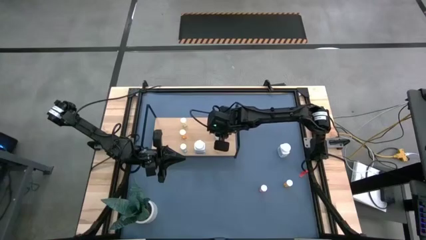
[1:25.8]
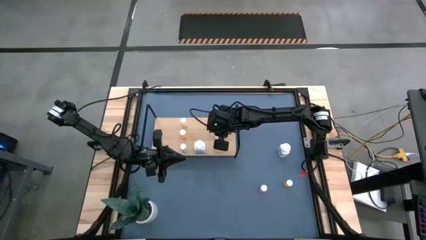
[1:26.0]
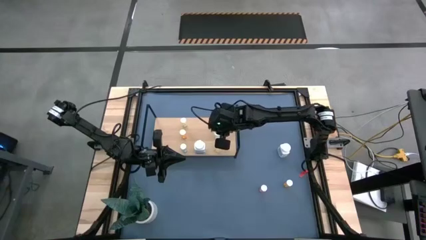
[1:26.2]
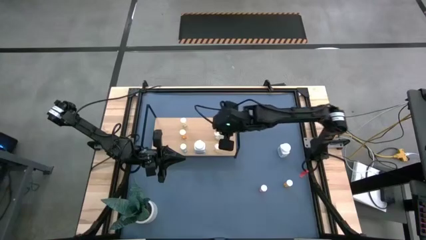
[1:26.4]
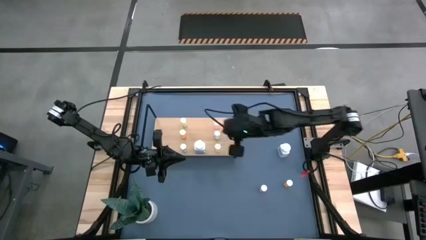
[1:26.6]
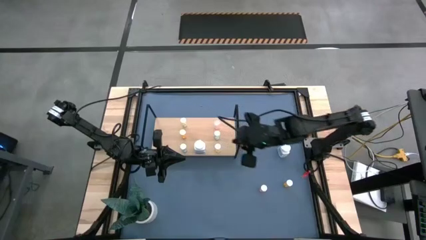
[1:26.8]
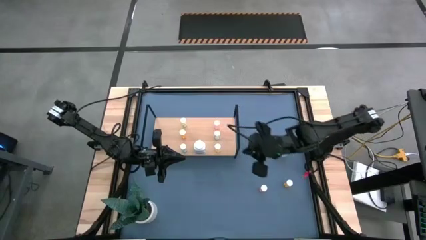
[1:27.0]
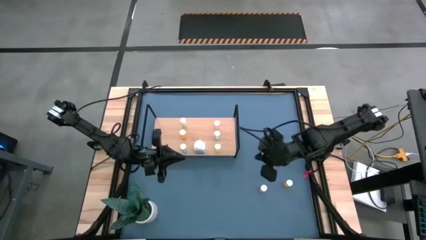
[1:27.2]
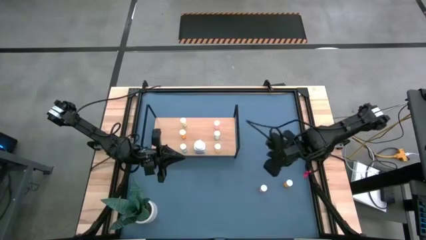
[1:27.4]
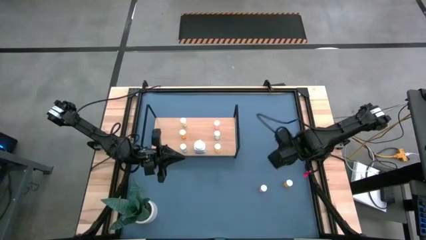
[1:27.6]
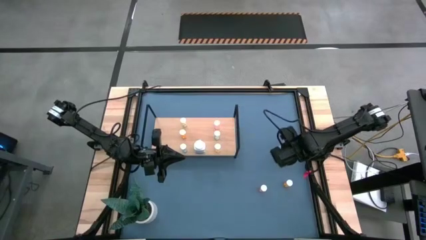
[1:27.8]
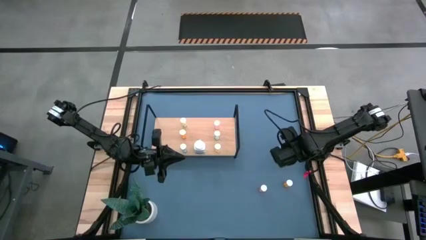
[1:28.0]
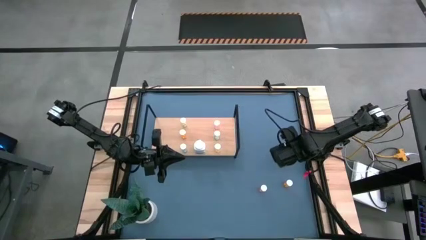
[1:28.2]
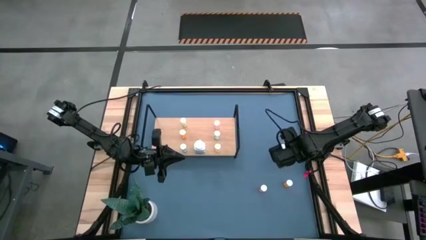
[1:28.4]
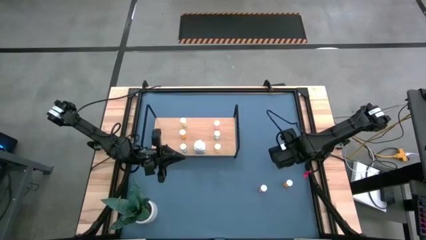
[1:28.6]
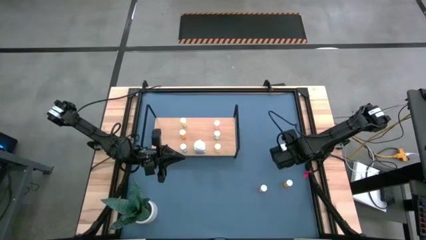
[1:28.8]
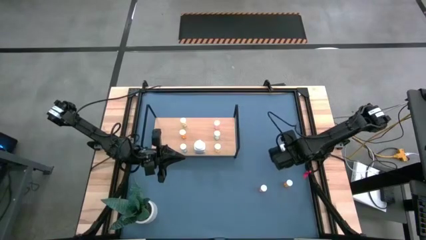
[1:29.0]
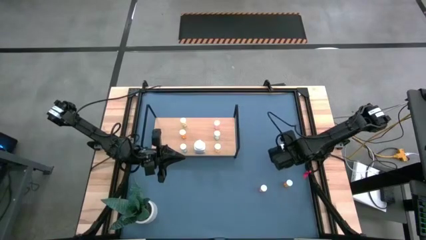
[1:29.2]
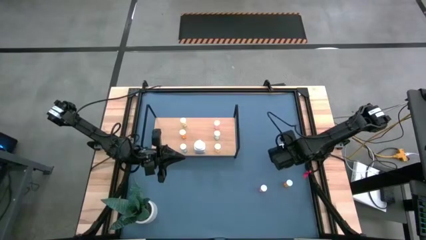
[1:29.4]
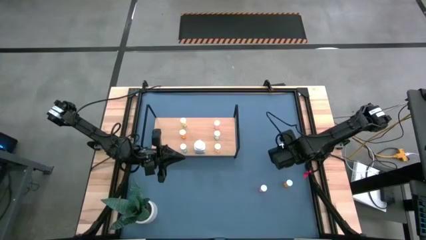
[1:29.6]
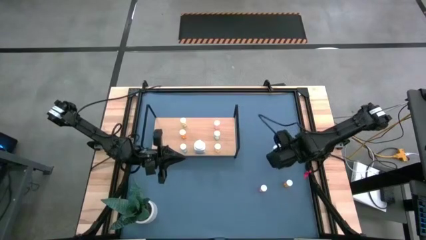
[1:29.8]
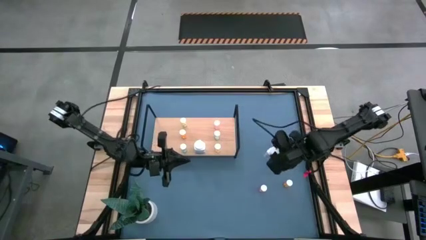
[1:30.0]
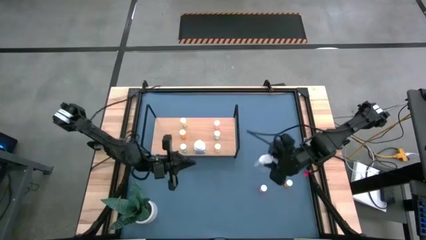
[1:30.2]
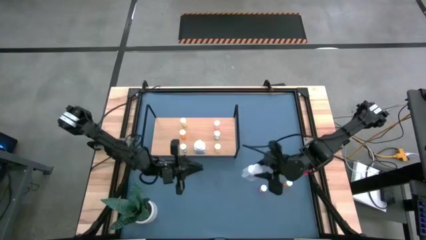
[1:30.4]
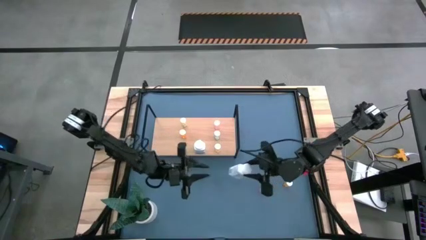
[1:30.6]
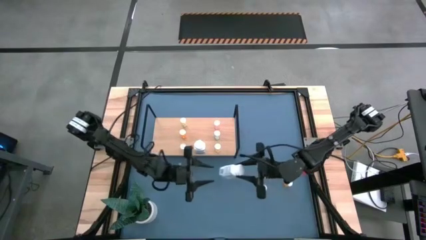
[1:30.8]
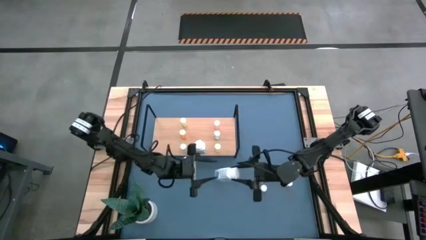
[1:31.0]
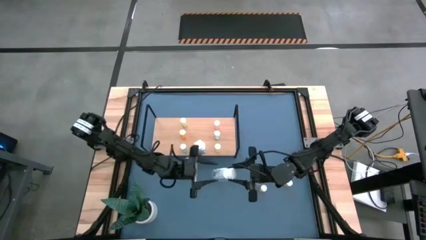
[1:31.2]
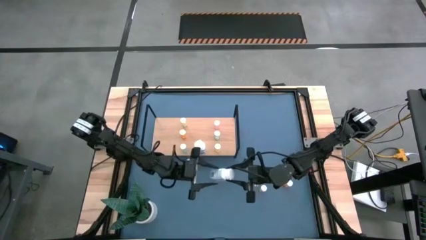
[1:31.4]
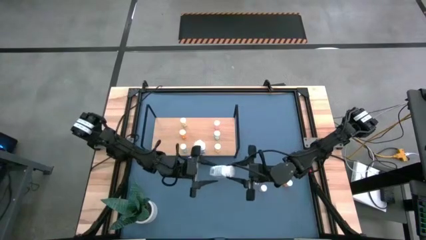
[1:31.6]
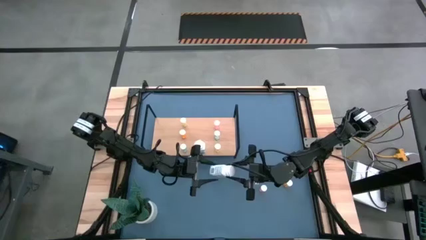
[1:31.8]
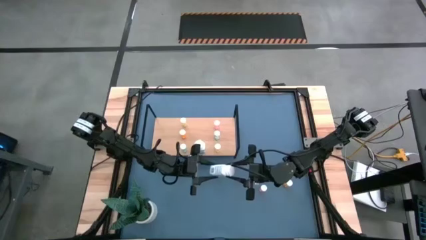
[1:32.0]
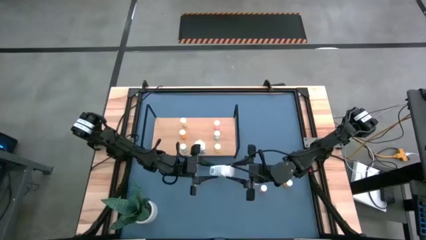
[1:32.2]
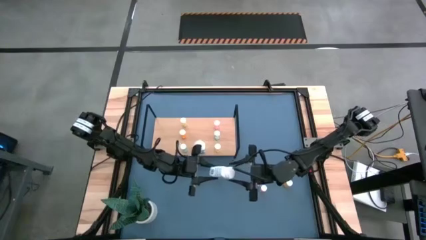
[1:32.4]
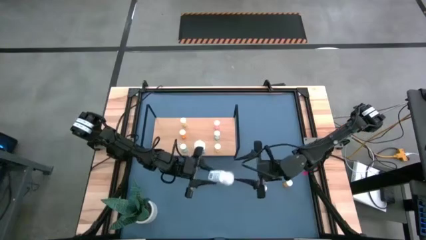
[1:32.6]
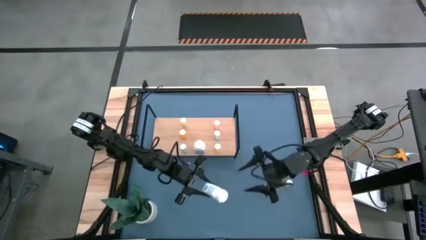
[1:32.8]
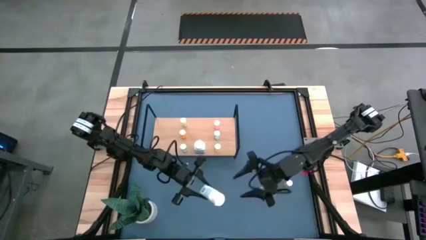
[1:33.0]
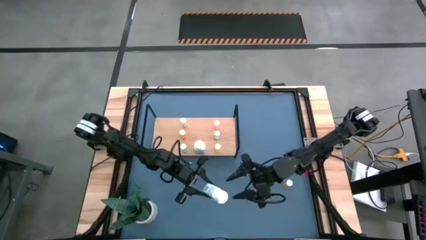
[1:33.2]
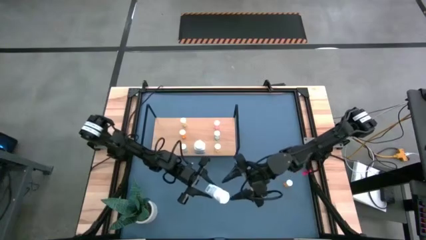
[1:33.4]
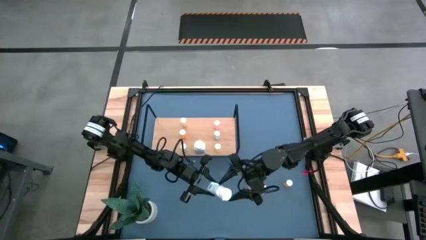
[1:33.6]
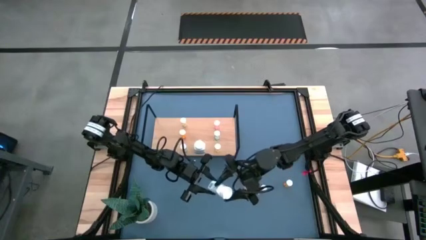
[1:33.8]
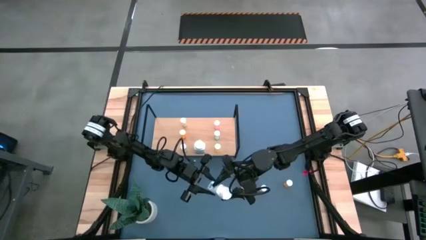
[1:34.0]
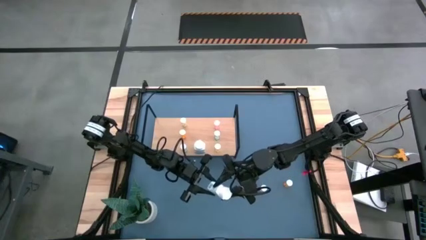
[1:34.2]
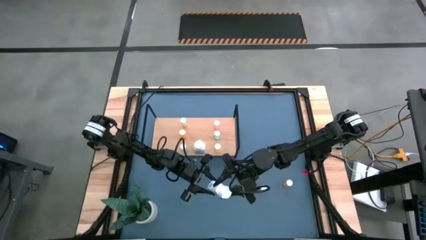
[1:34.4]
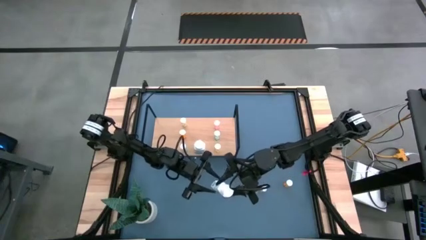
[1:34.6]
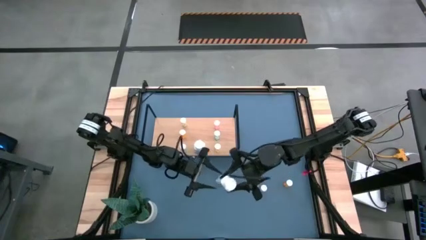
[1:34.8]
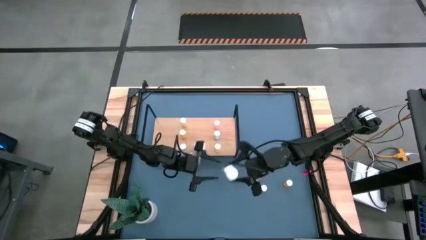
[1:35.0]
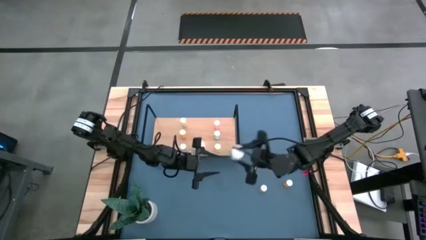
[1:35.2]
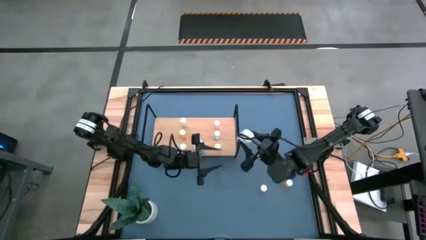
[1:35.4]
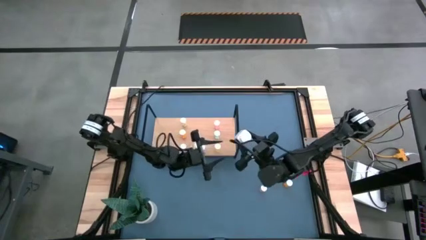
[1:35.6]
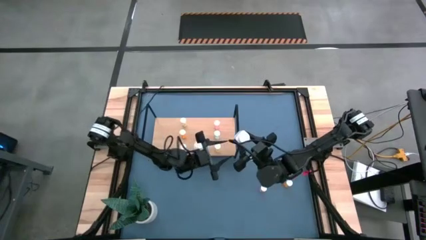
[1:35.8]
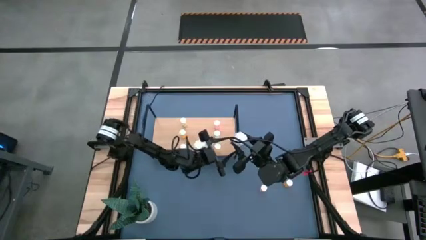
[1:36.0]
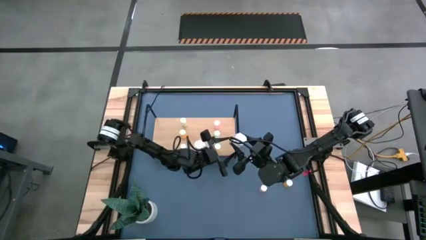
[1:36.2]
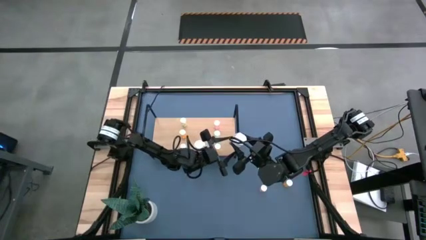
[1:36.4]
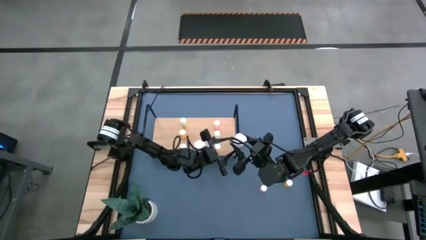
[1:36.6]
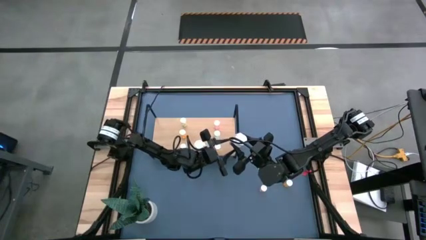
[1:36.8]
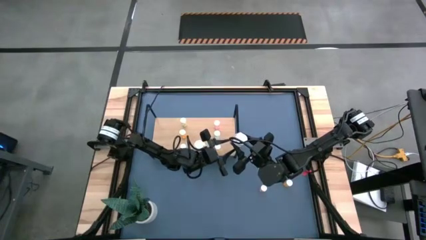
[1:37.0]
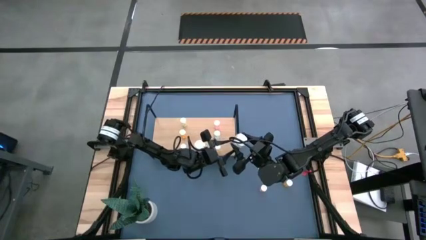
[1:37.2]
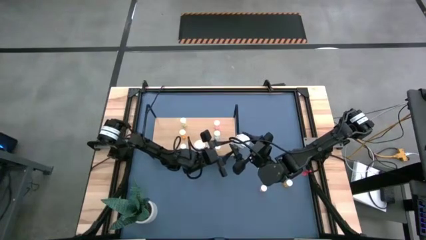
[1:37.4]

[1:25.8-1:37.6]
Task: Pick and place medicine bottles onto shelf by color
Put the white pill bottle on the shelf

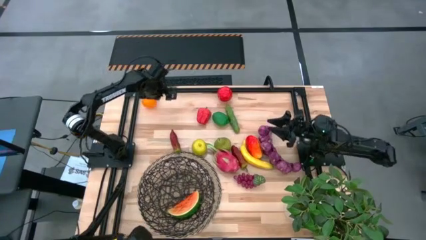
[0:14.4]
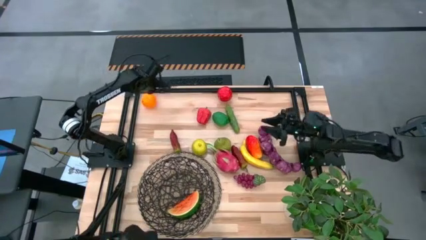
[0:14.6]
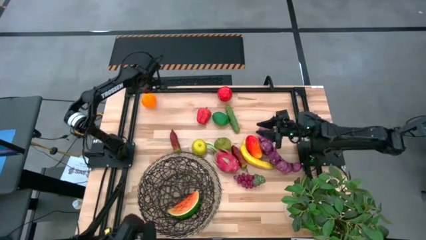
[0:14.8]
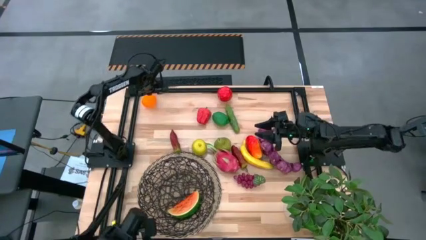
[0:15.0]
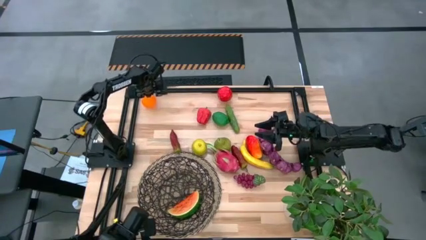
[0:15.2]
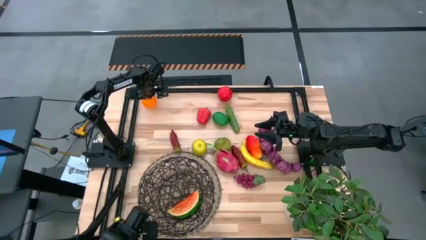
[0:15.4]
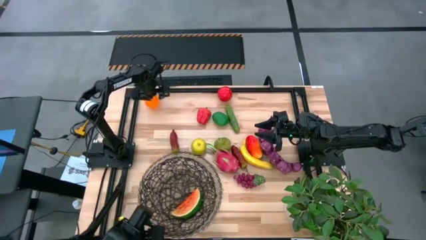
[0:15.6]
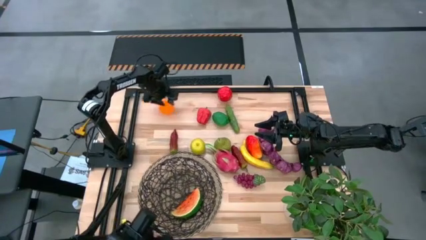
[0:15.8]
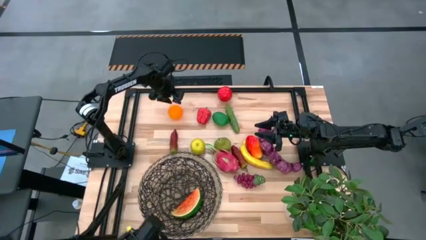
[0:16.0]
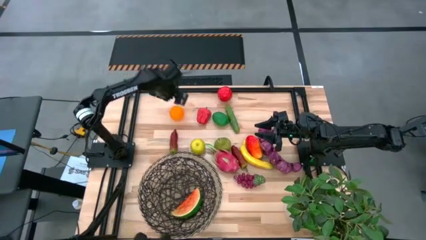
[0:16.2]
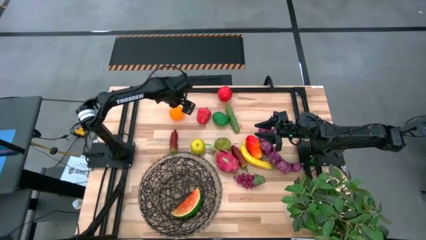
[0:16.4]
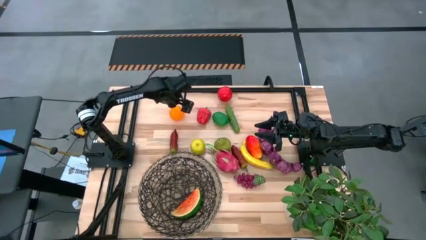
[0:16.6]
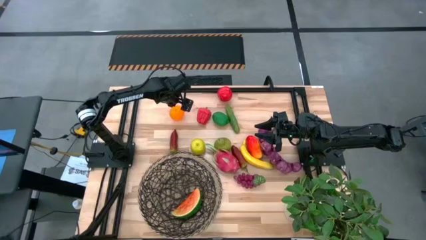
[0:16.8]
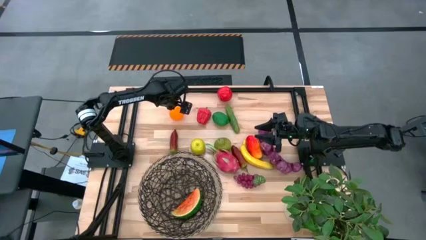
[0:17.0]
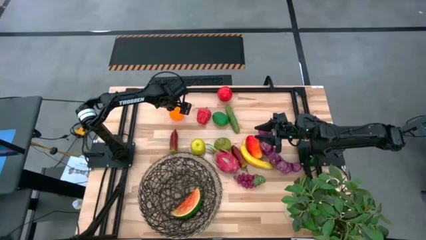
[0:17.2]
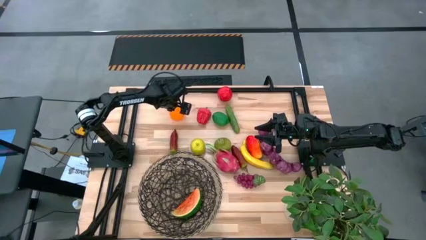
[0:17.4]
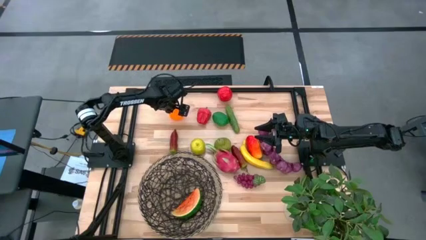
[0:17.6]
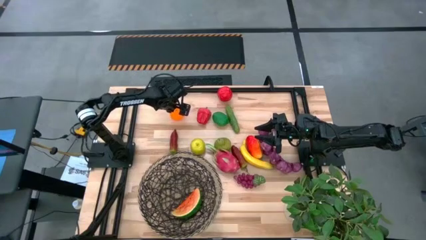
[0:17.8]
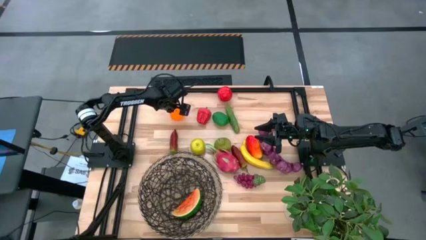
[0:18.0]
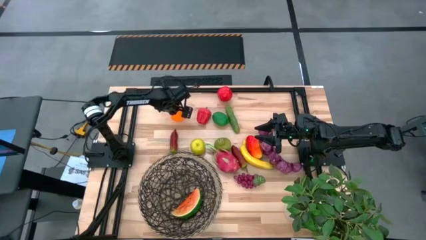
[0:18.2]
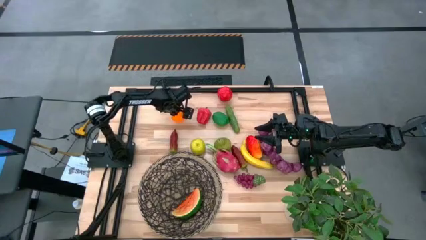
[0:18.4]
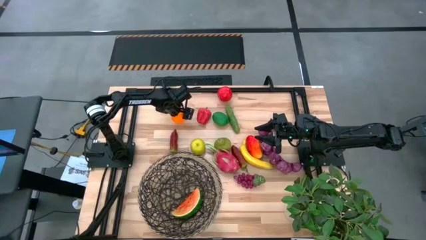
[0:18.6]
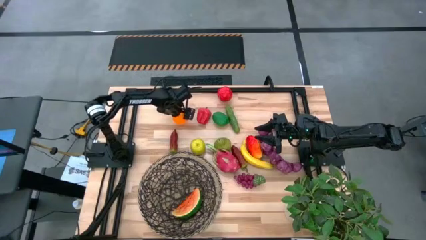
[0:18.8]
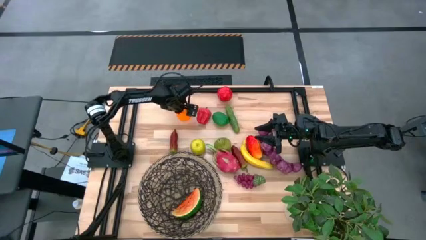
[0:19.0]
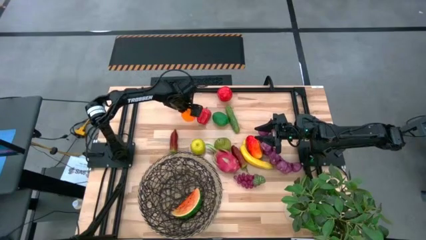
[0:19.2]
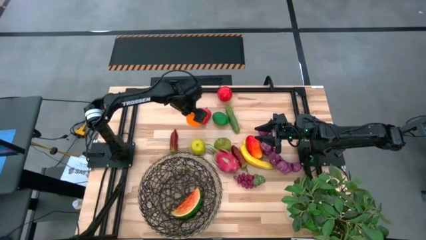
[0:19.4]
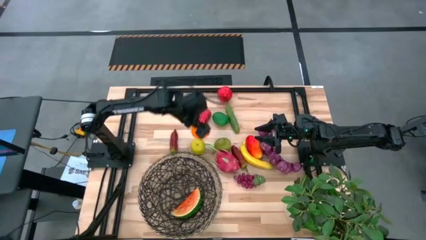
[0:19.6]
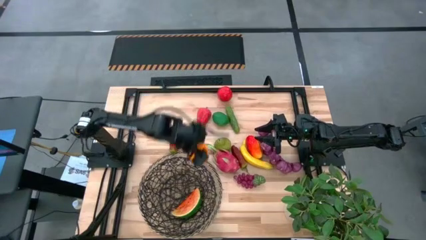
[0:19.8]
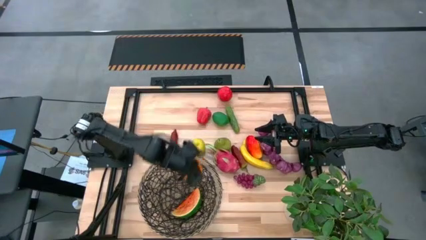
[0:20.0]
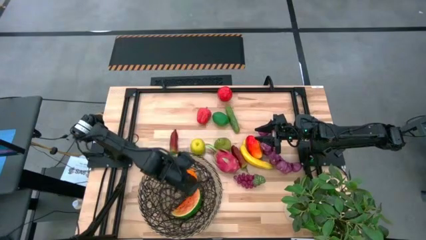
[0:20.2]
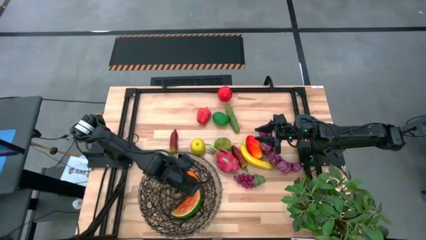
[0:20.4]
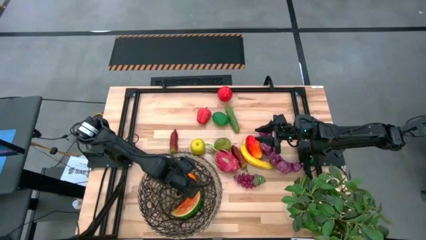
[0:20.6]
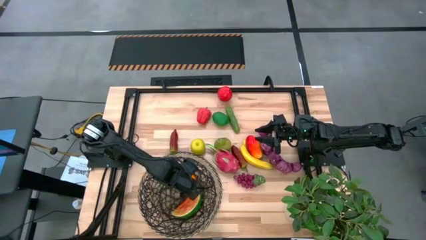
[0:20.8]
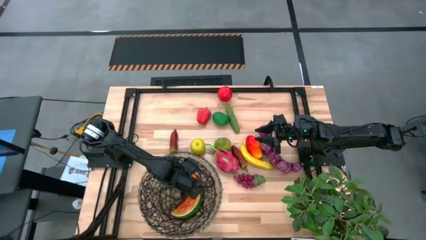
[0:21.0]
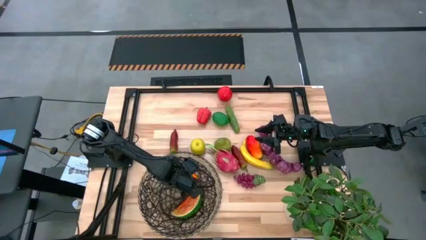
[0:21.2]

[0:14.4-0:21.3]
Task: Build produce basket
Put the orange into the woven basket
